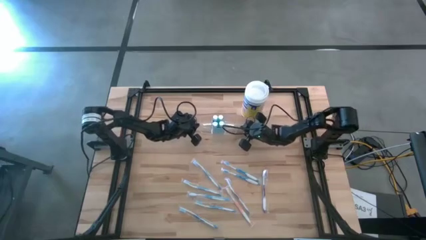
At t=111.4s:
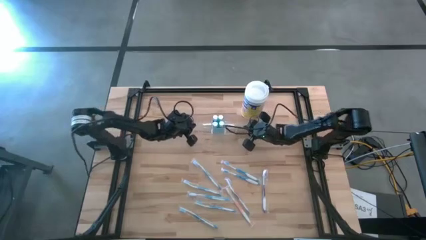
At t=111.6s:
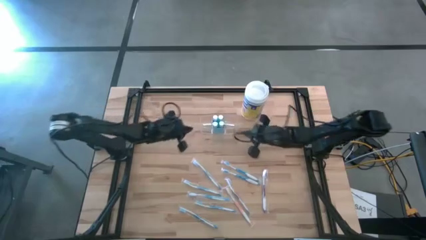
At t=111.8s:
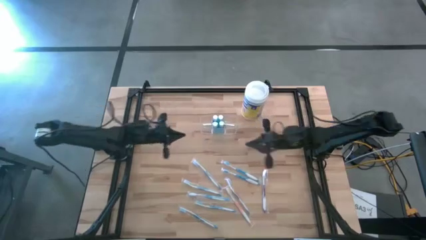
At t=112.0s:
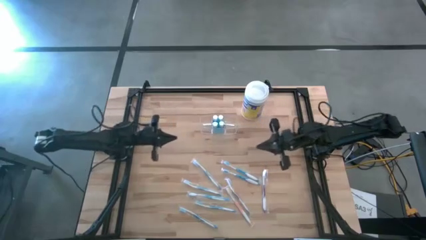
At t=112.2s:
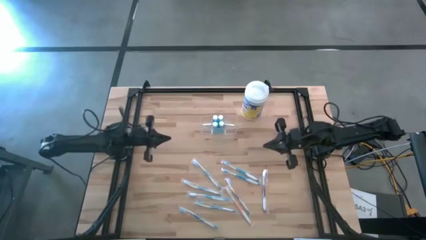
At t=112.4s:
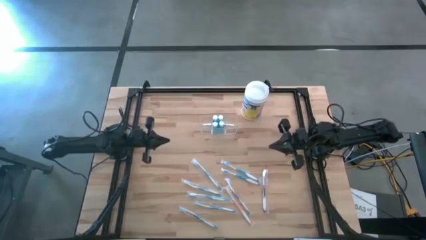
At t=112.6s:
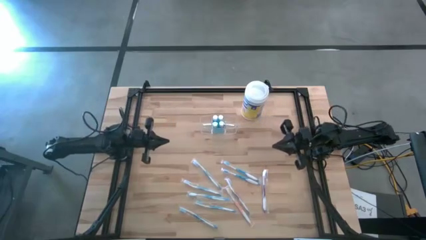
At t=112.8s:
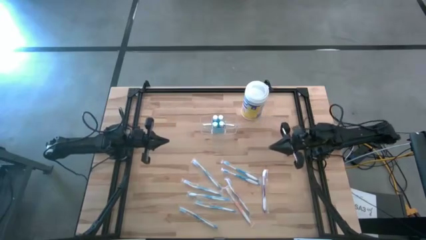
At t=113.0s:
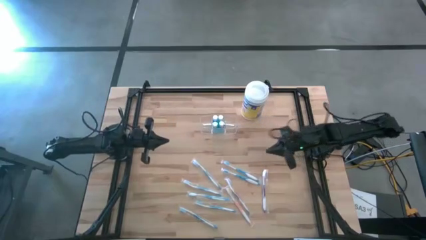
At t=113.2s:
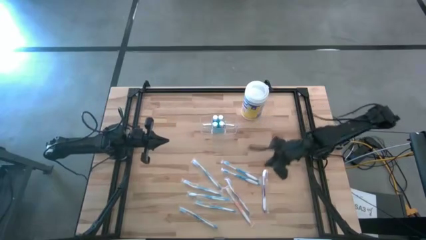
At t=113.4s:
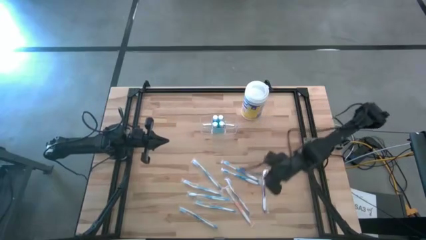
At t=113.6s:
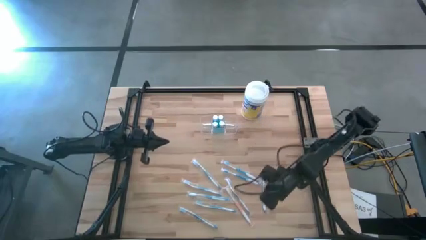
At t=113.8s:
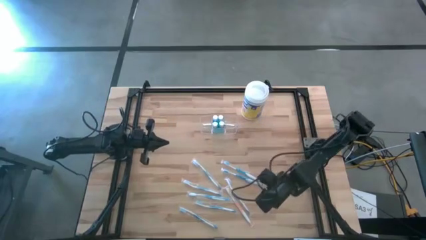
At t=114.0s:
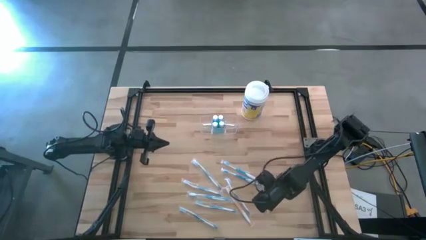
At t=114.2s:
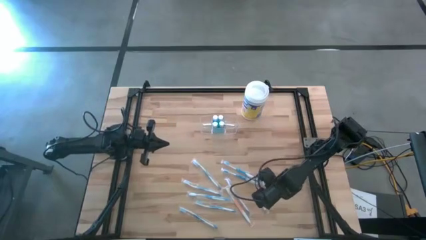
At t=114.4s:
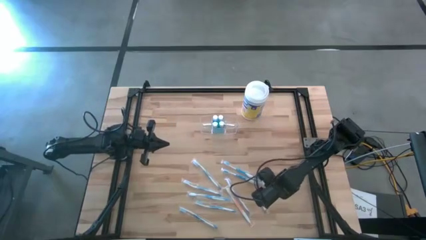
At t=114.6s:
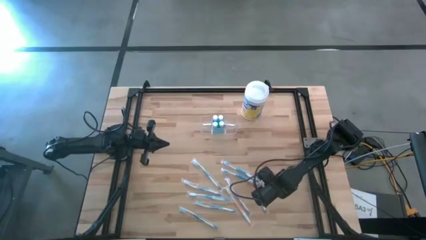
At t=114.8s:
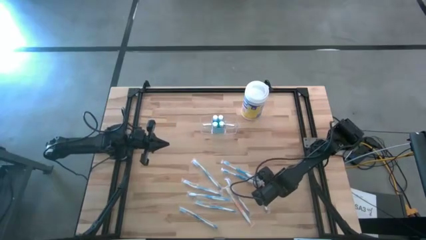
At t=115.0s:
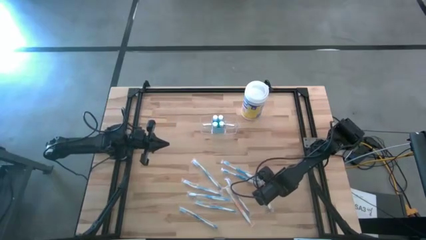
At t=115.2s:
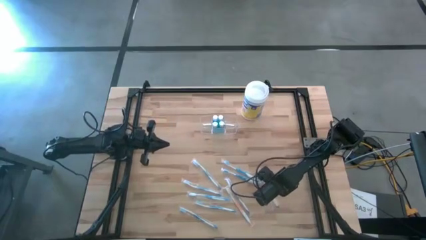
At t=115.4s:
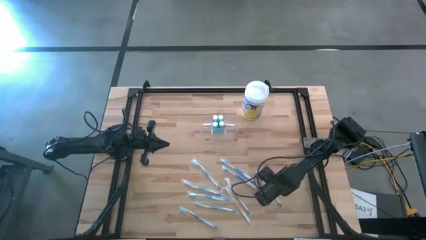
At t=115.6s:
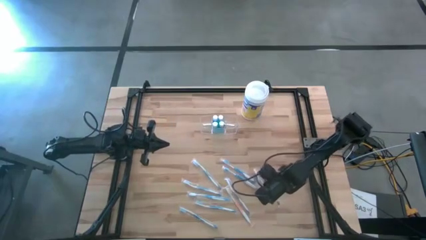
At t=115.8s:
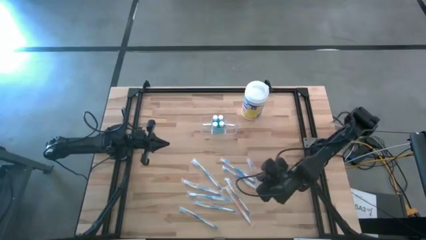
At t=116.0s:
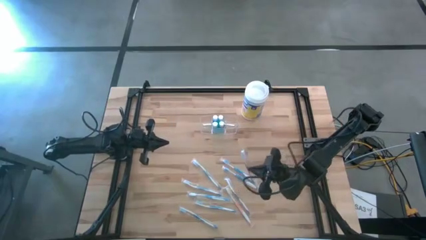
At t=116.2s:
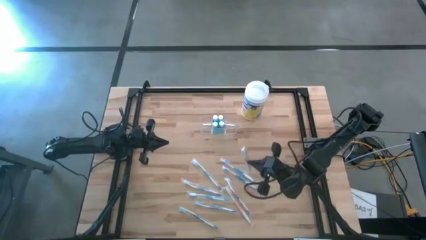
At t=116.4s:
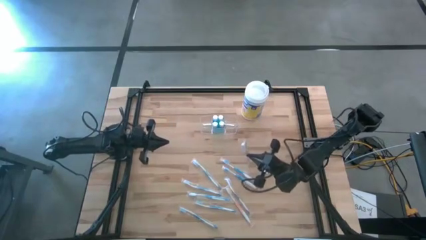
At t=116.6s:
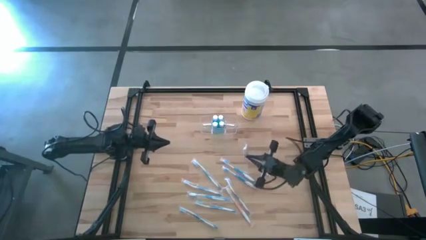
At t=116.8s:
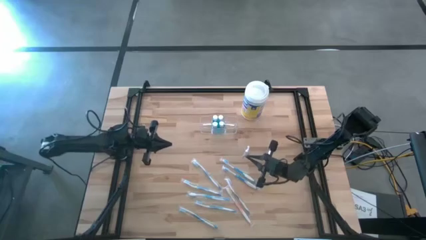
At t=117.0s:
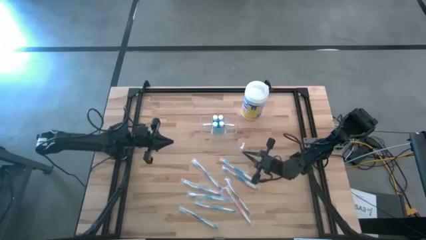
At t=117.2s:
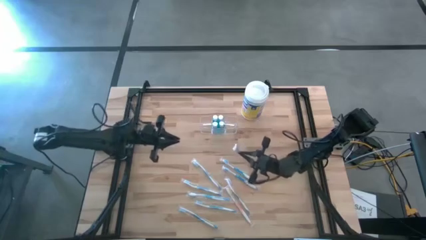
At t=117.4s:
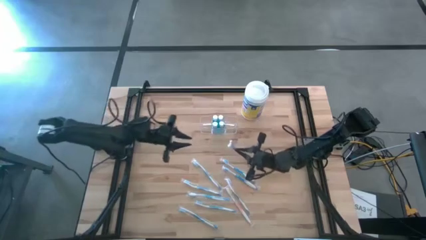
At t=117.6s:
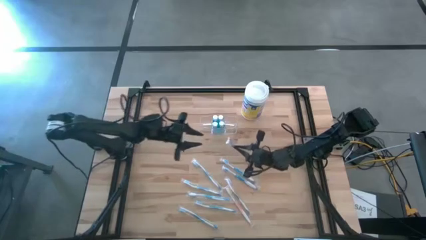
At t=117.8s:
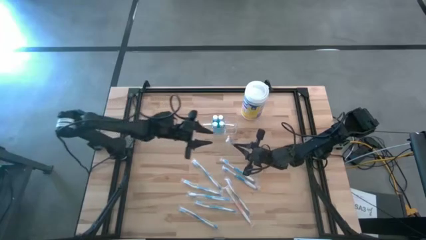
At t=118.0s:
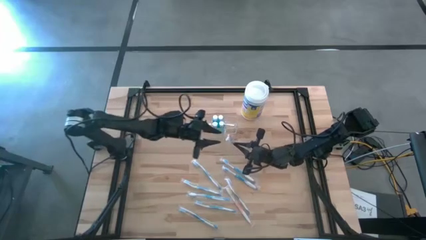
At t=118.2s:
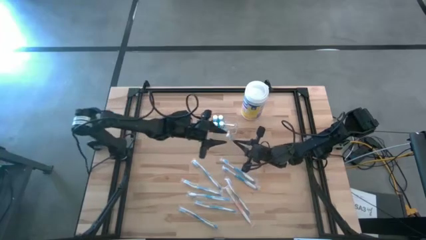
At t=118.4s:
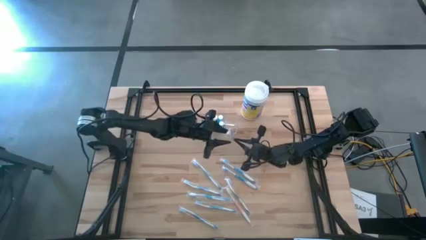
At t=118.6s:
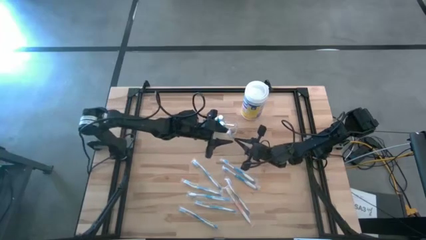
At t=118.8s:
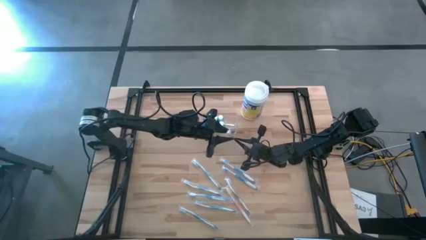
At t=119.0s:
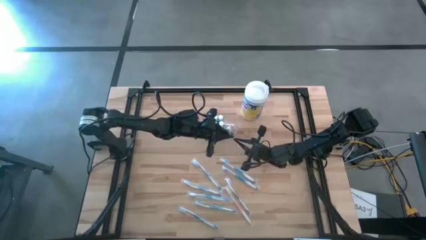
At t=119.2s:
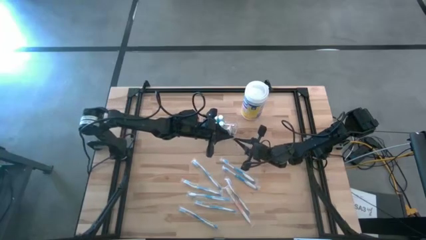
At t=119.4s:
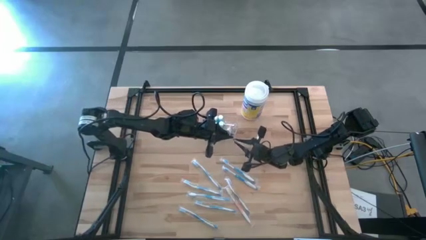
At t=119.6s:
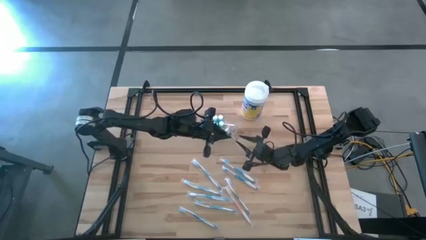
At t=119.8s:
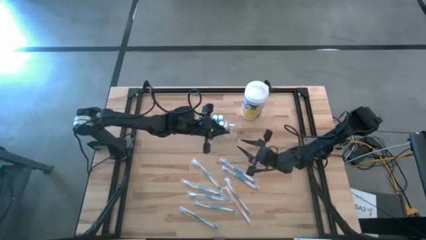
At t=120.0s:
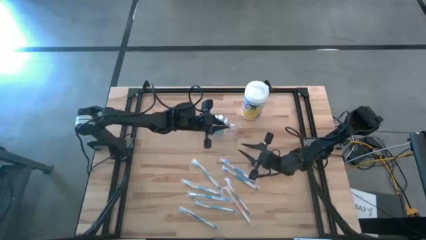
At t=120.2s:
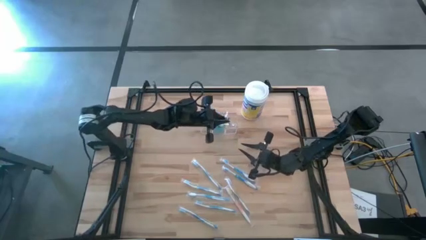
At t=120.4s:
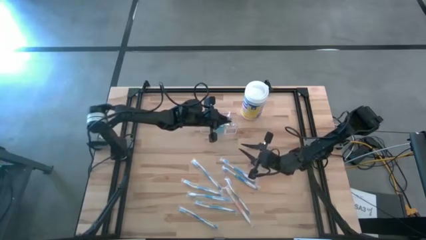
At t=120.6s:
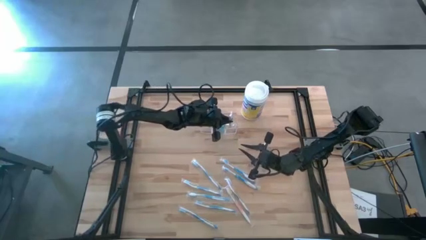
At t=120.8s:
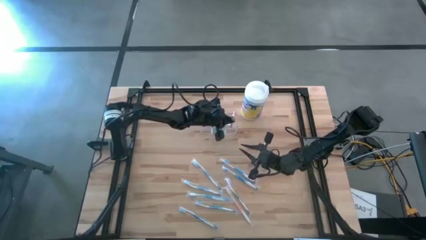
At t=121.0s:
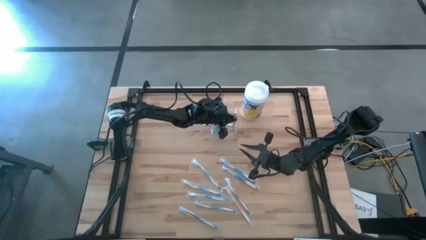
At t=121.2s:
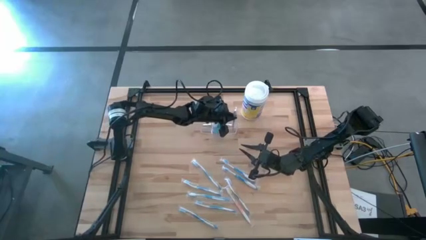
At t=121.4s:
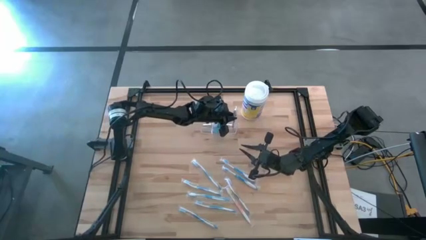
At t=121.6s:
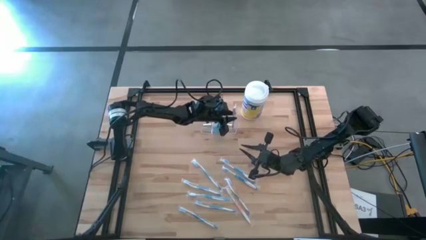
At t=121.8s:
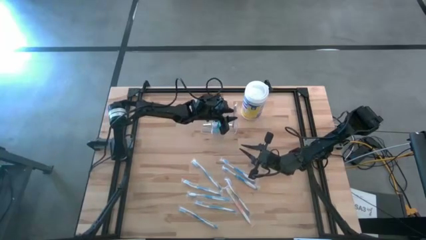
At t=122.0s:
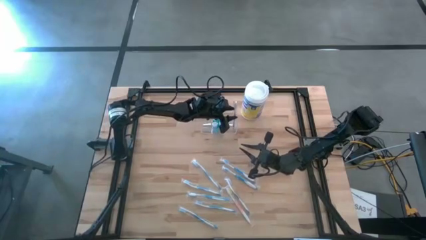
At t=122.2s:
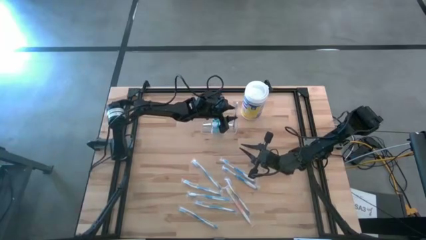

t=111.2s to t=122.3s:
Task: Pick & Place toothbrushing station
Put the violet toothbrush into the transparent organizer

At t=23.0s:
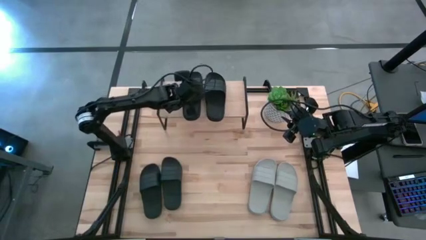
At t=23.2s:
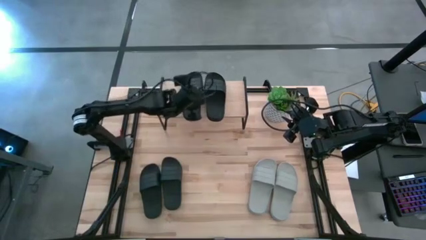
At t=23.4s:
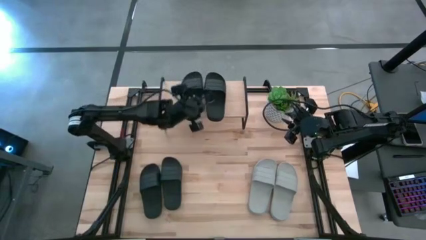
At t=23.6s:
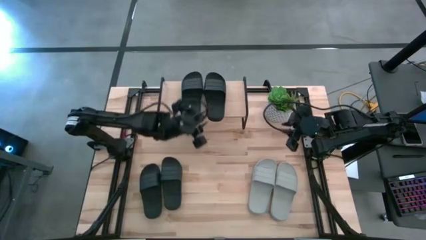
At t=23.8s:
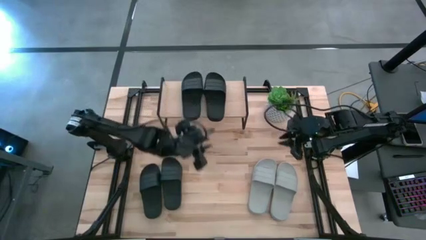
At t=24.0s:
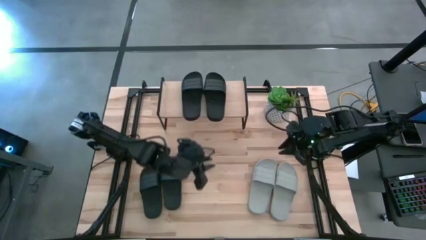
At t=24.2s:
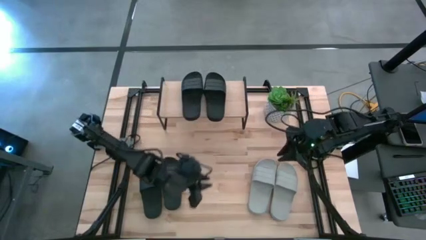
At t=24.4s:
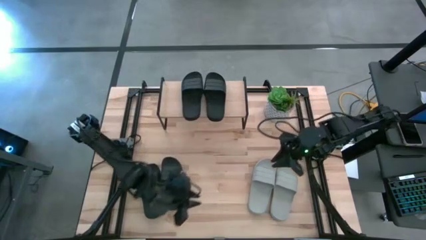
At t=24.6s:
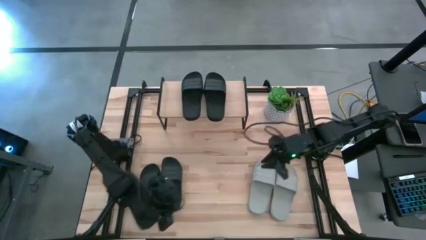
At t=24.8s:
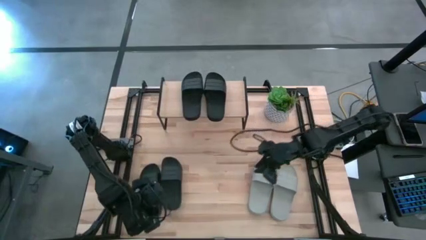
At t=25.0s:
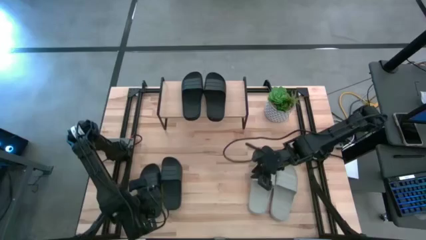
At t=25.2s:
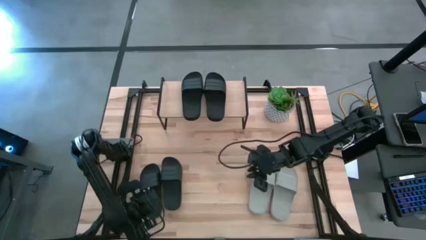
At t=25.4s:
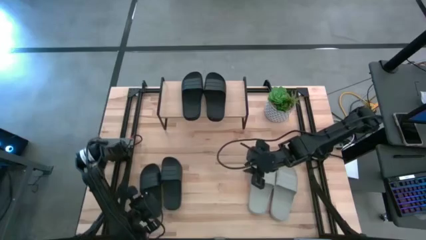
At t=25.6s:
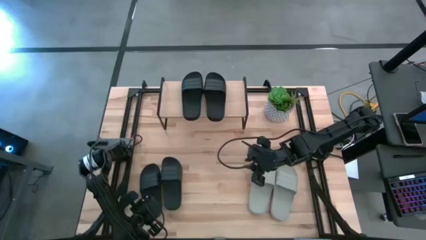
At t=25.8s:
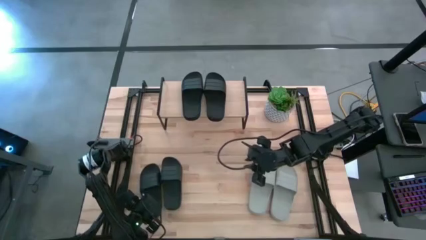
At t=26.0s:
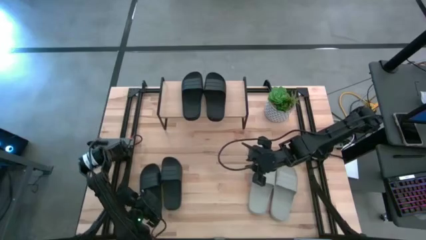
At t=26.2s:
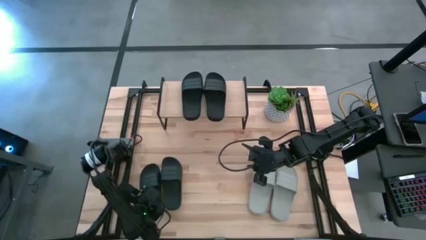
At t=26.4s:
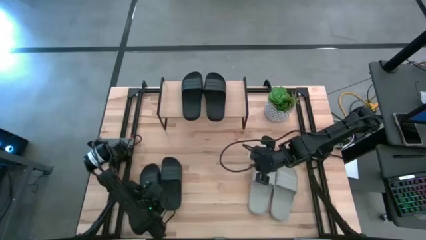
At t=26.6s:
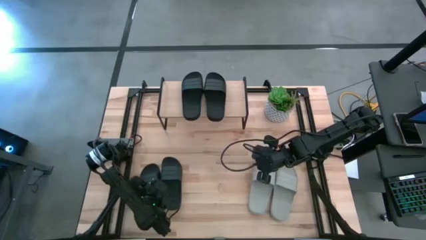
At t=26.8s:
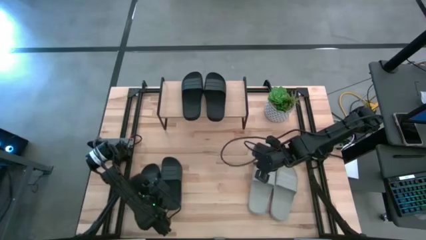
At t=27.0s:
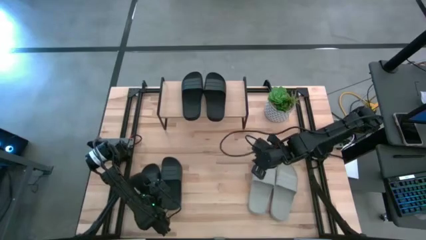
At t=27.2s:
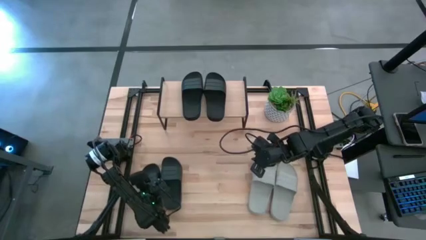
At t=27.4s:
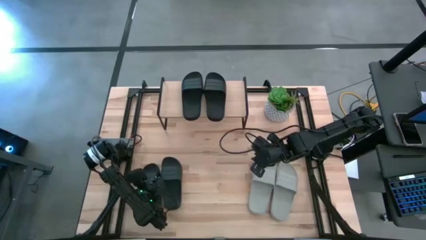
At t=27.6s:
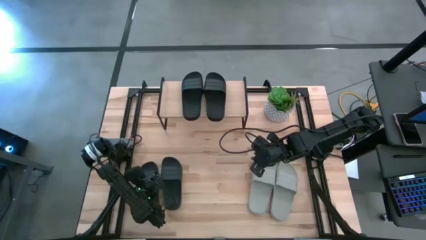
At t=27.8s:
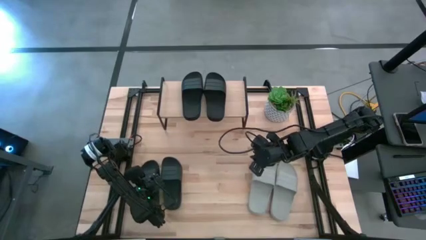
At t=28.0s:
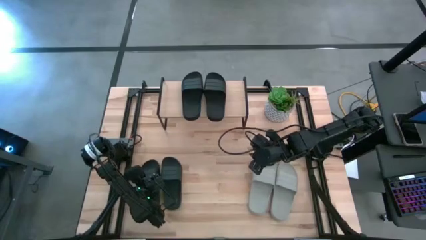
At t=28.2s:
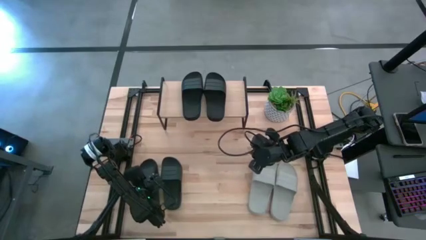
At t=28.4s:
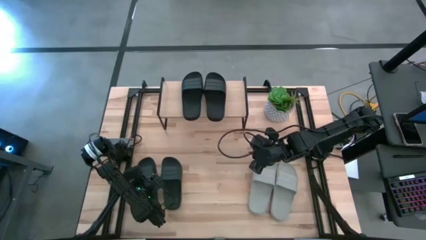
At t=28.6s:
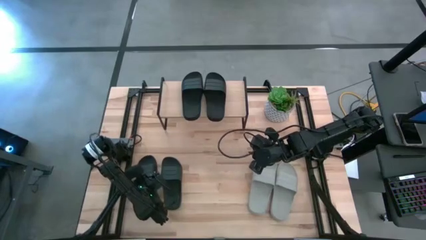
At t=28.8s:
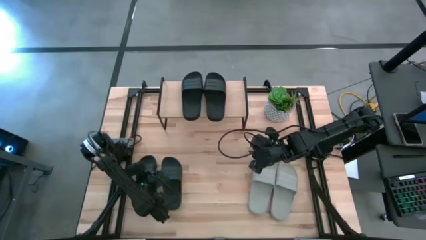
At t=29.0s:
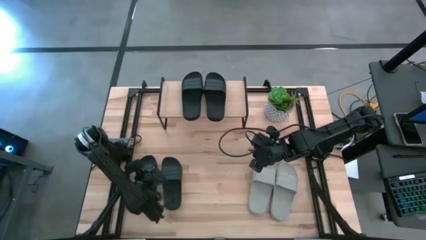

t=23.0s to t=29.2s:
Task: Pick and place slides into the shelf
Put the black slide under the shelf
